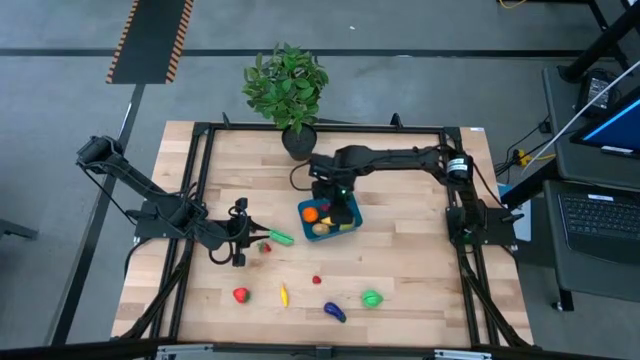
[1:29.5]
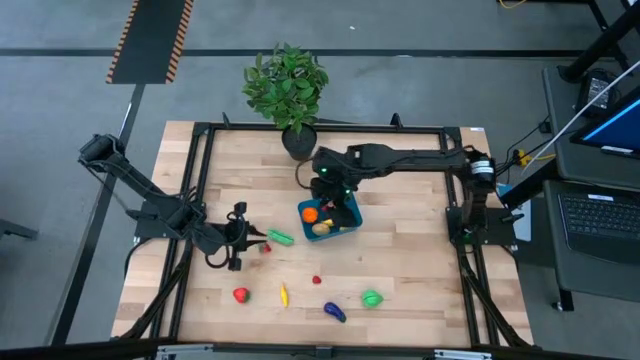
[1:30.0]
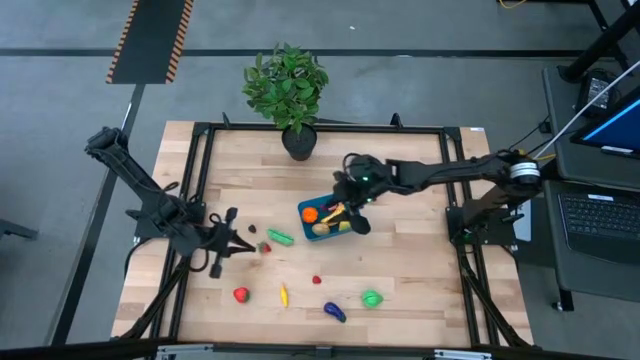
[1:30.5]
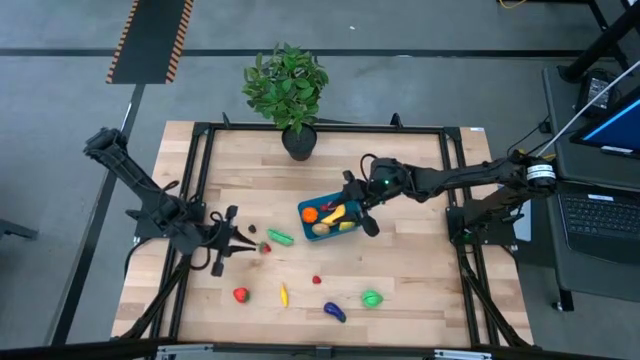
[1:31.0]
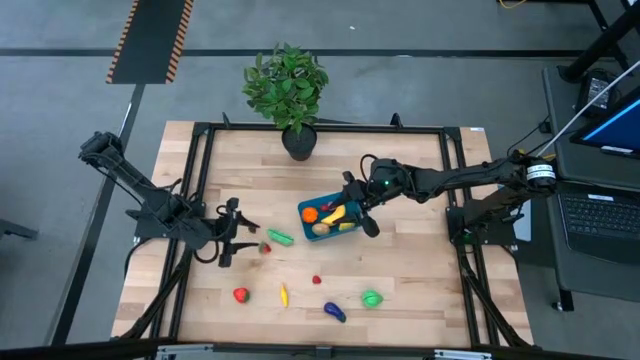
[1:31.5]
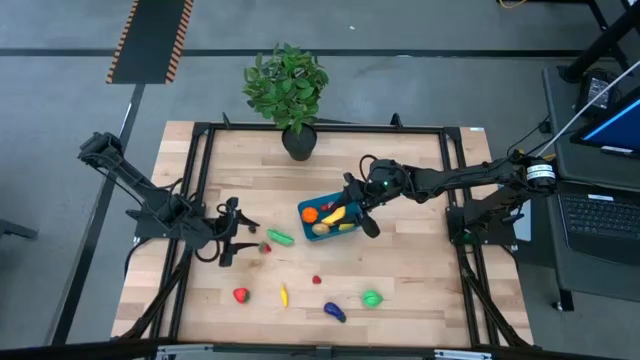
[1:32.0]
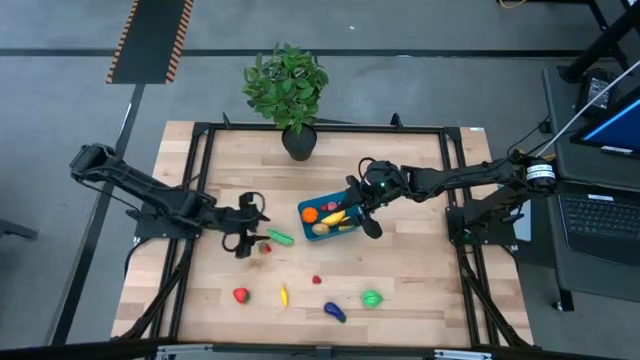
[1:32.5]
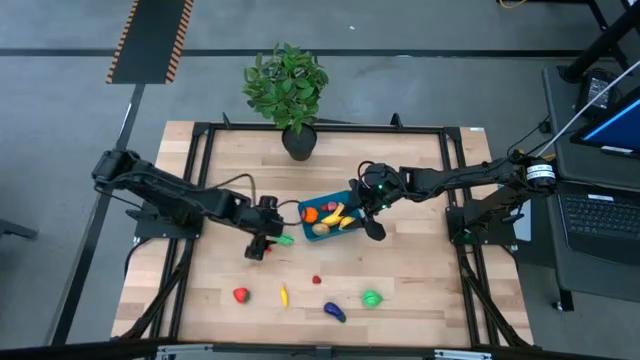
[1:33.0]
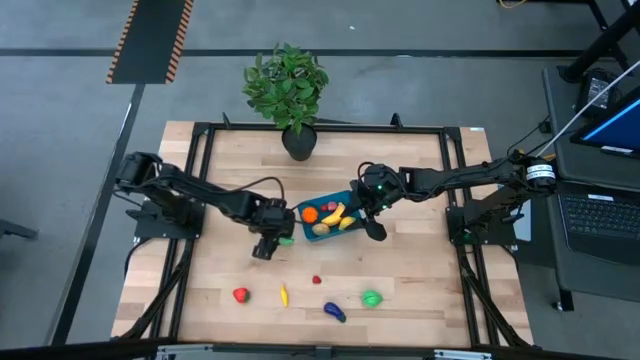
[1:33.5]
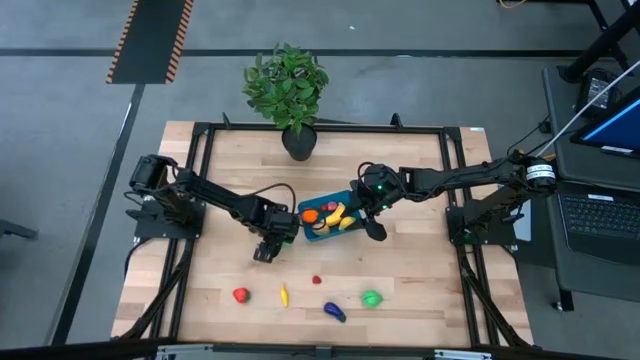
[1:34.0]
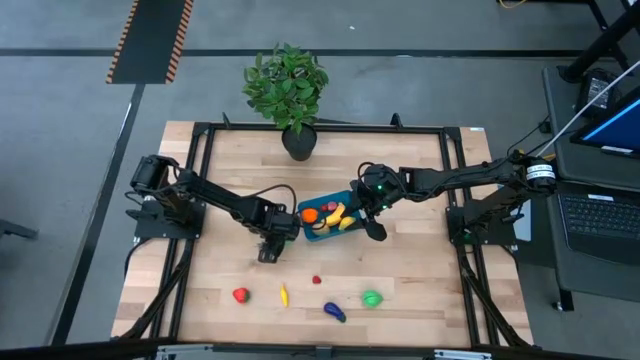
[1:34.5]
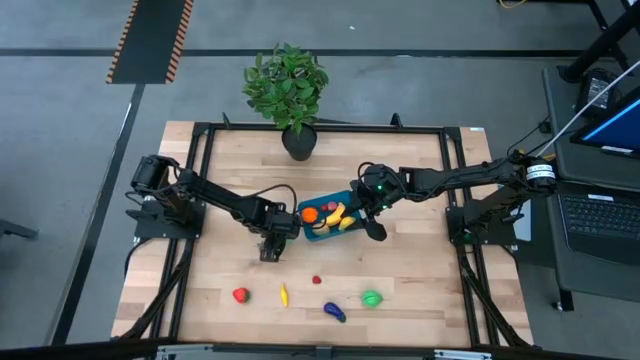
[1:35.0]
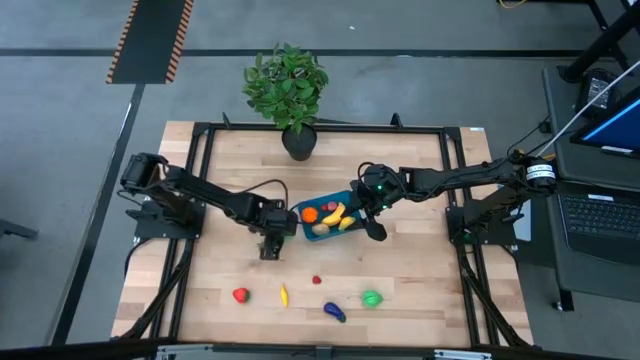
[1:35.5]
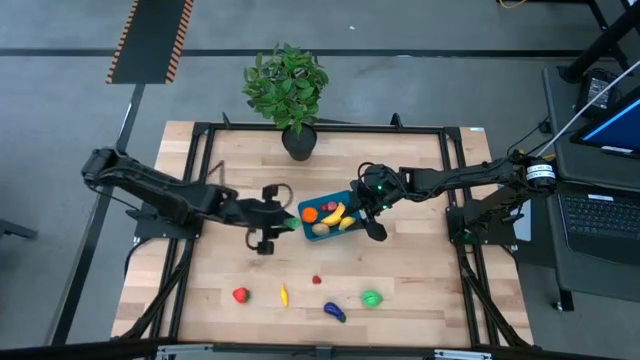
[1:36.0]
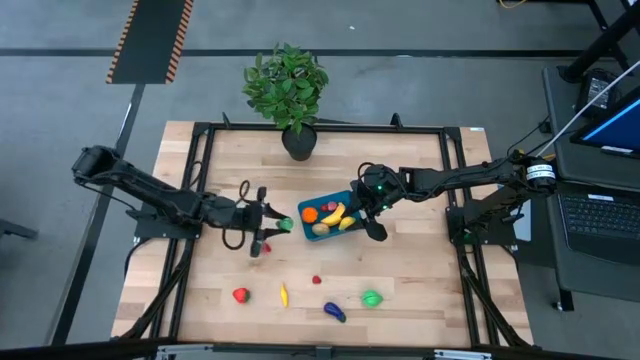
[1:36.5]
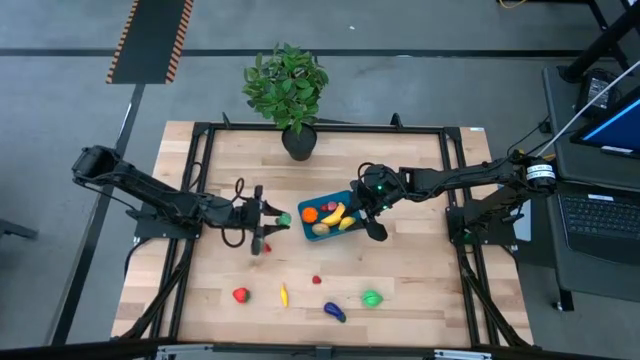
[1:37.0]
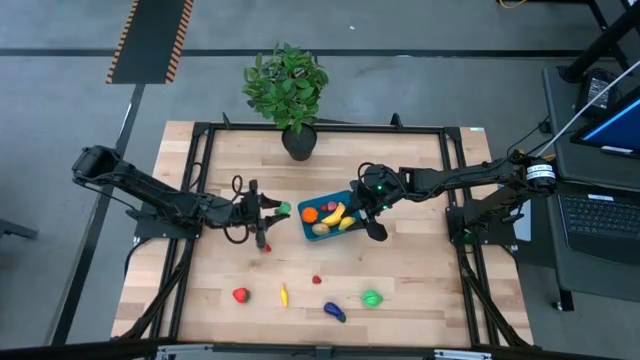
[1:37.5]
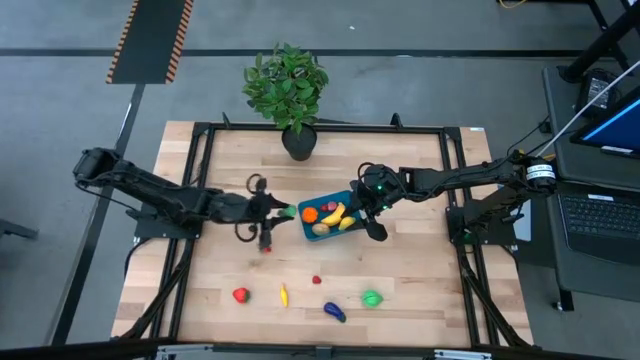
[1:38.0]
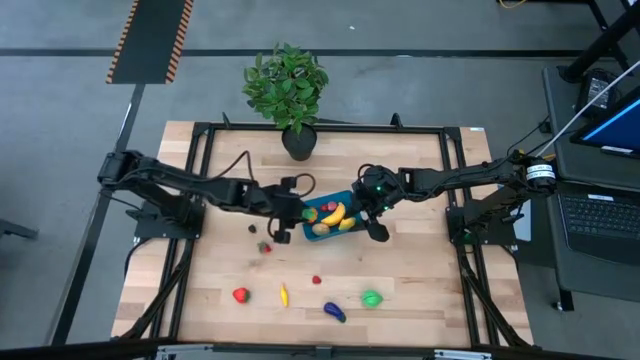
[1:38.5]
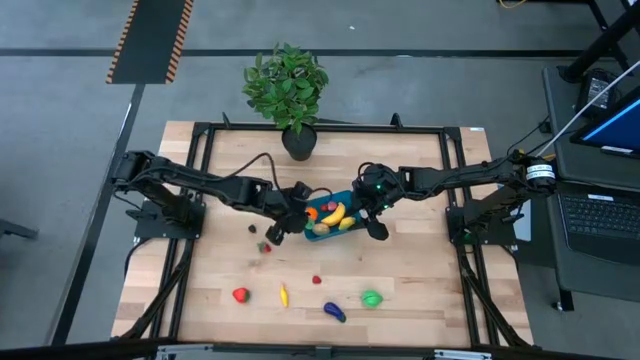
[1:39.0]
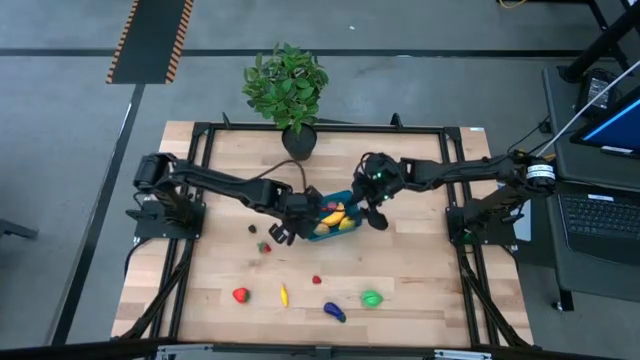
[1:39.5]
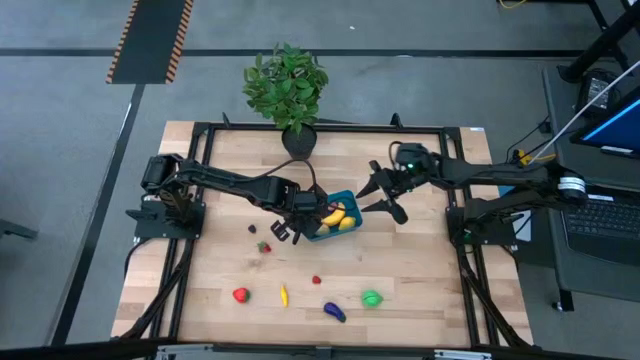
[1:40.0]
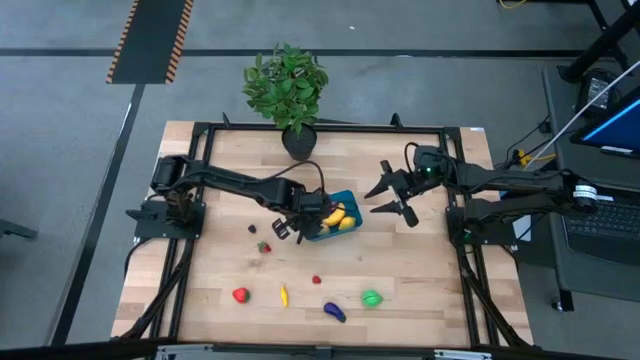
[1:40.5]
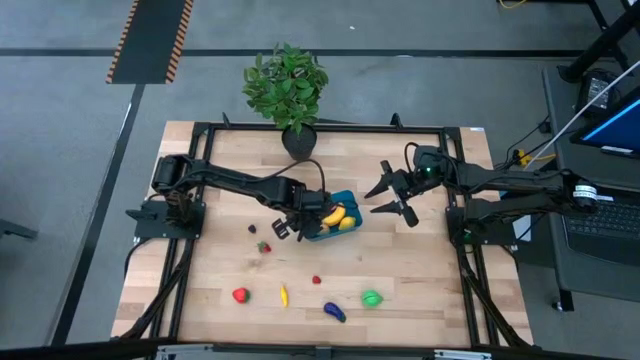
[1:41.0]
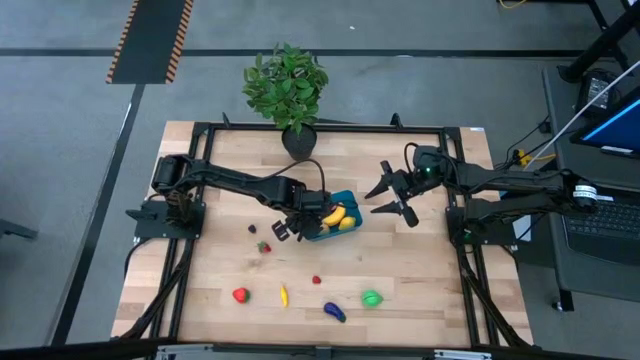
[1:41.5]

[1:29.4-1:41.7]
Task: Pick and placing Produce into tupperware
Put the green pea into the blue bin

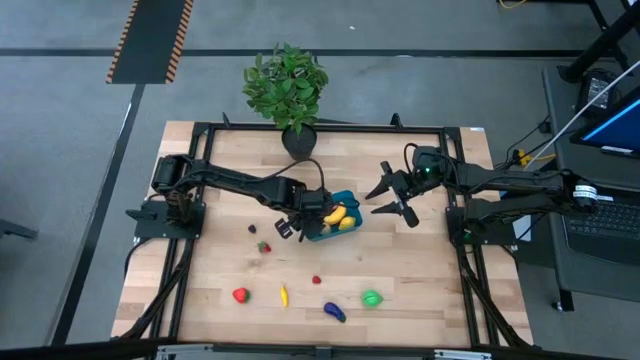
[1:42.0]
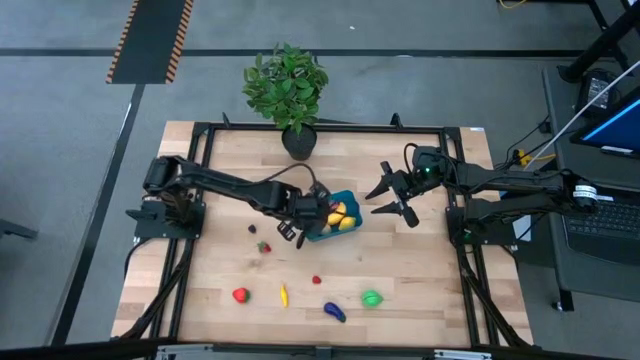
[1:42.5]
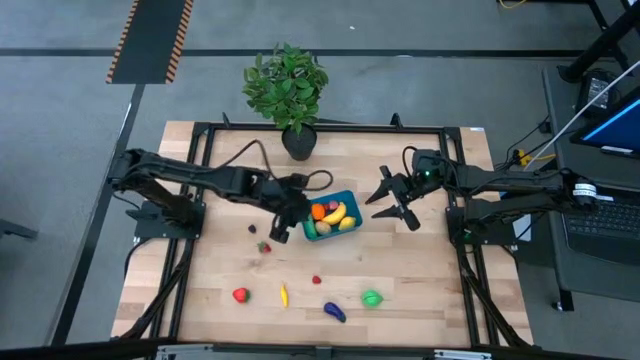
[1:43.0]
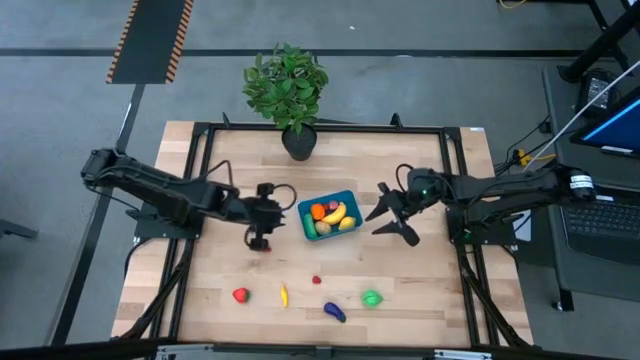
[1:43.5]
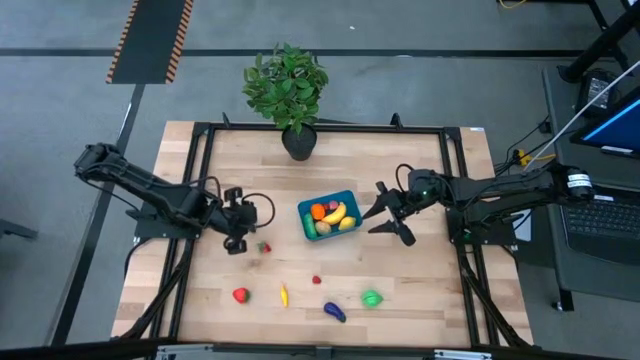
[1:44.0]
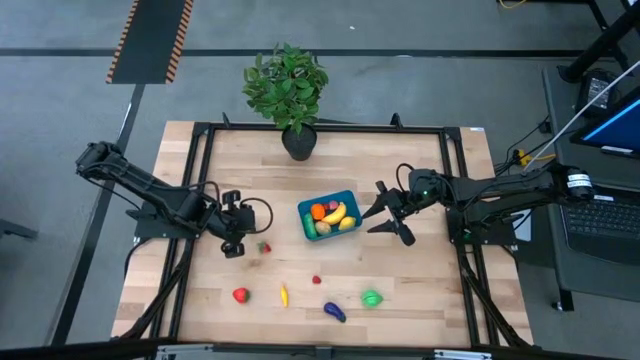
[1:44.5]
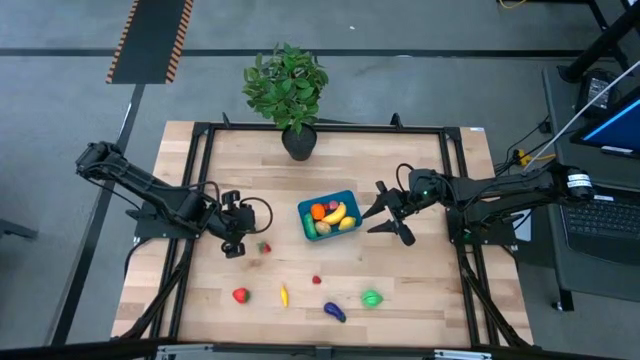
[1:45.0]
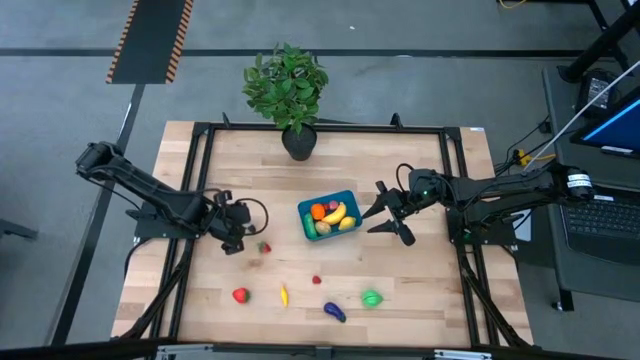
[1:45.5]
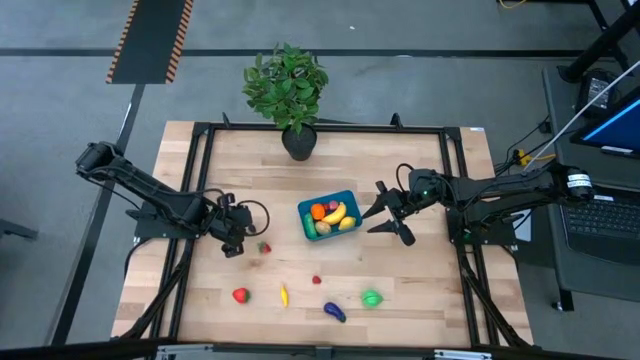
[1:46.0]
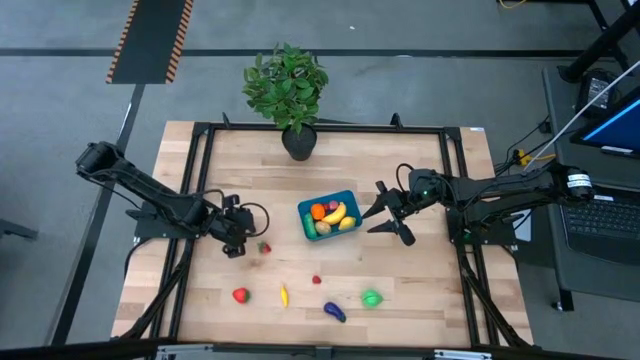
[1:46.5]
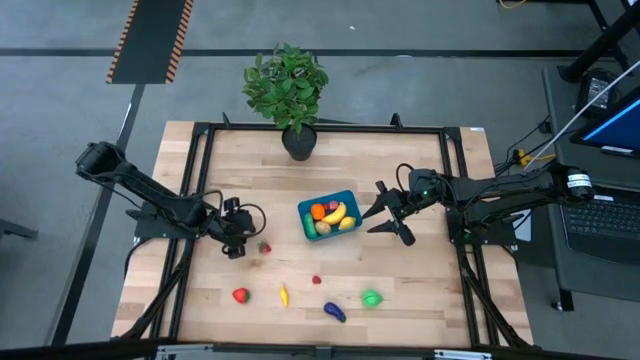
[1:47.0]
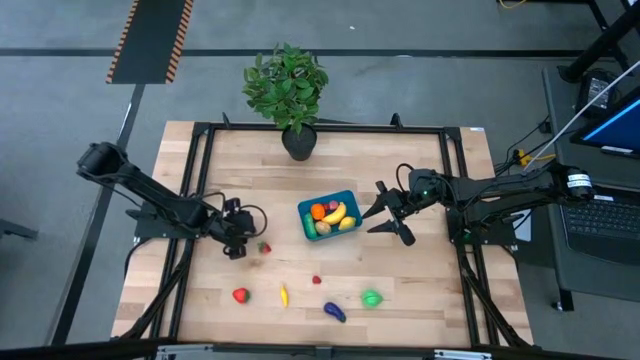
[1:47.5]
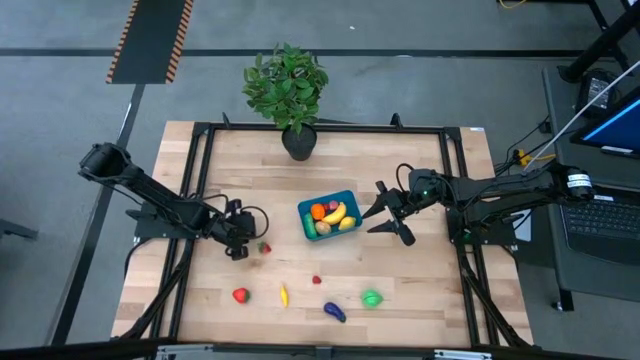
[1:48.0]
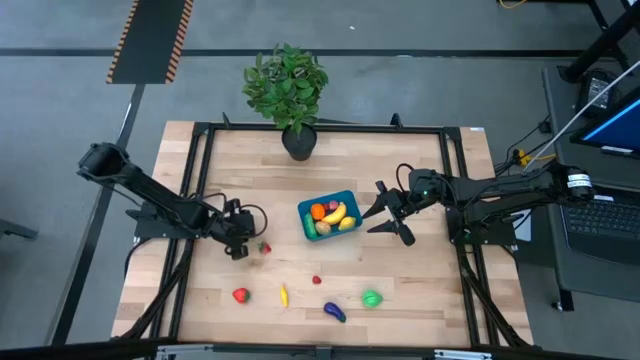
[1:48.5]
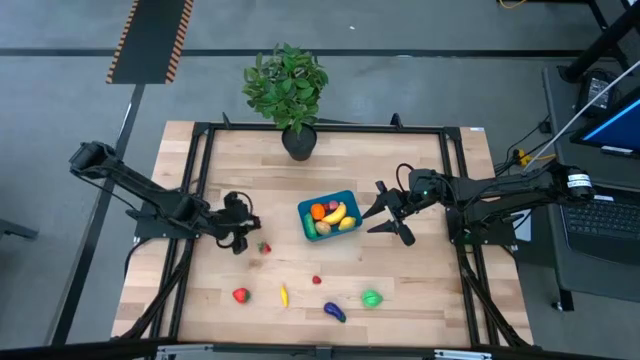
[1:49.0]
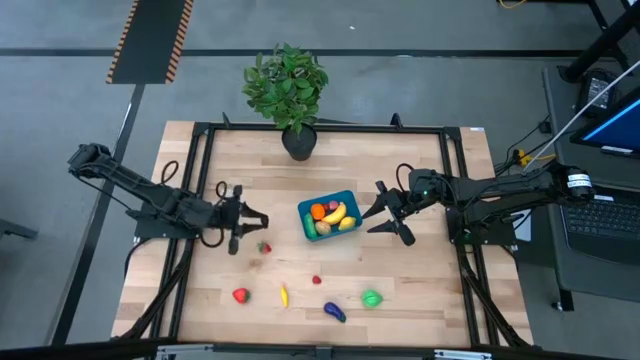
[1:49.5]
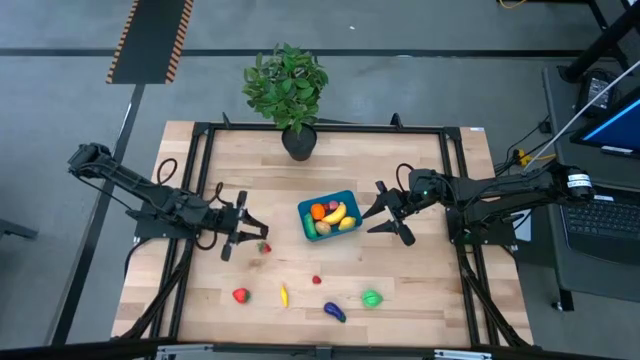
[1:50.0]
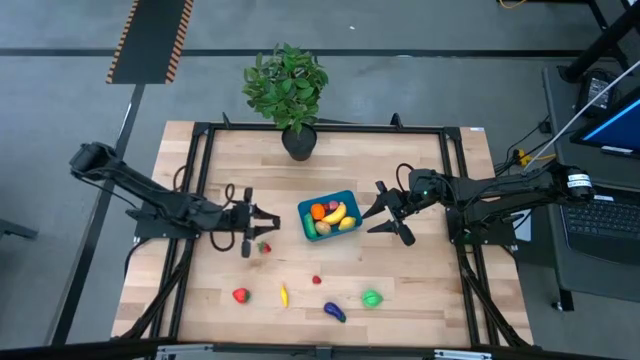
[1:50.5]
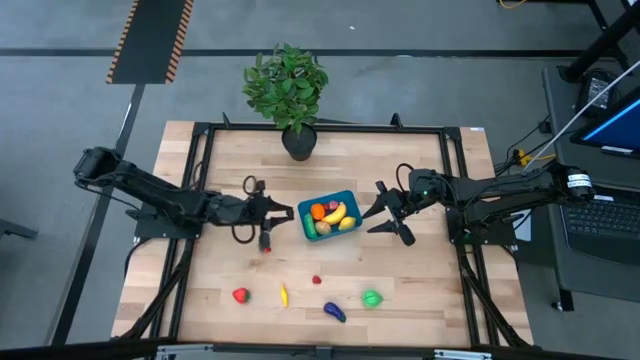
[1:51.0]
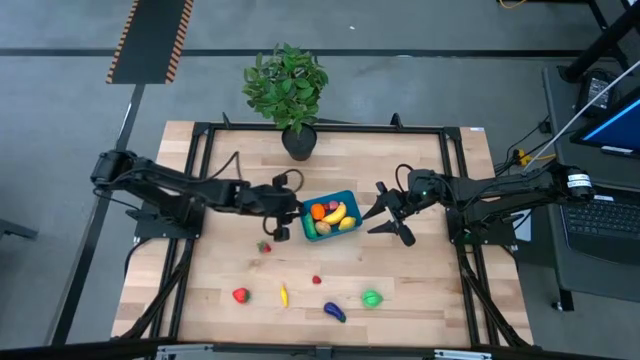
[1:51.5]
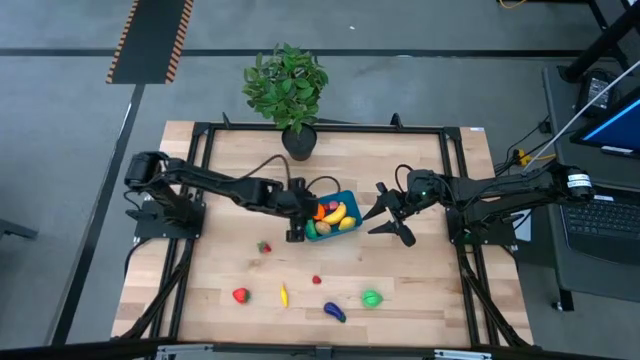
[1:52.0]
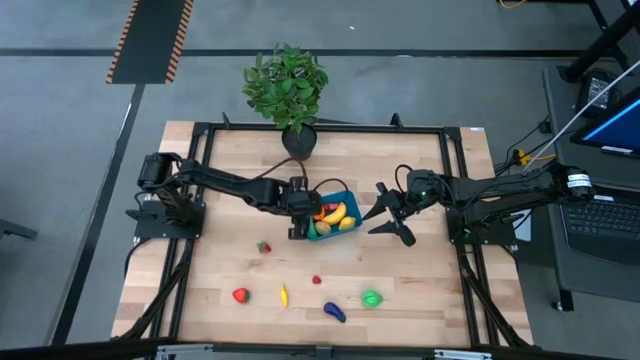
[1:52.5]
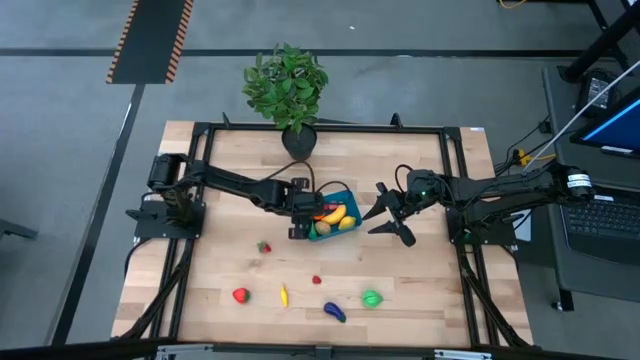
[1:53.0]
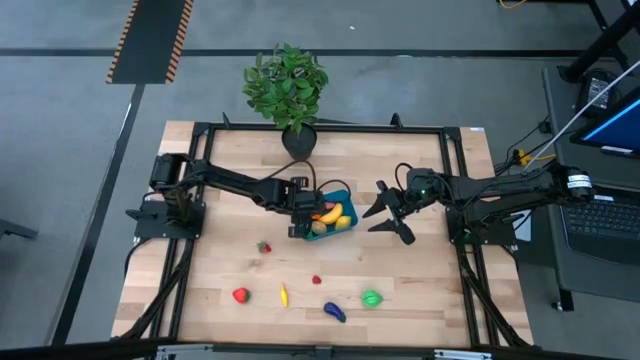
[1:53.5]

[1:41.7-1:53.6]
Put the blackberry into the blue bin
